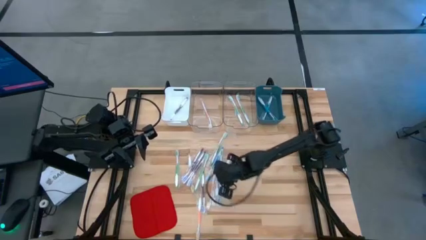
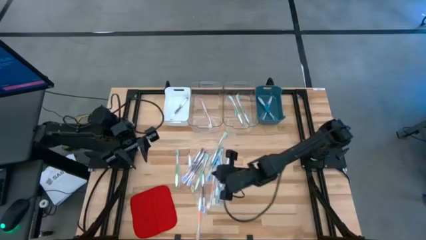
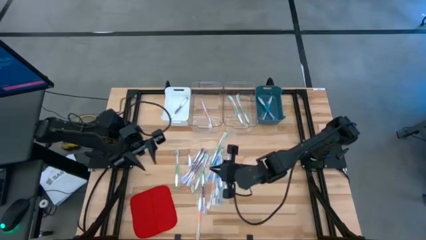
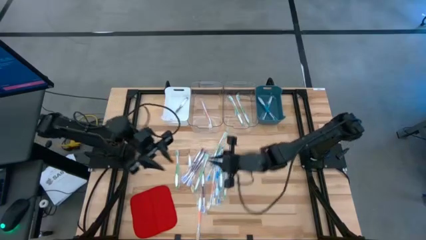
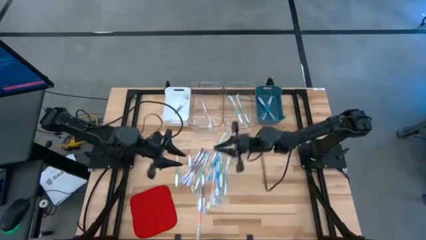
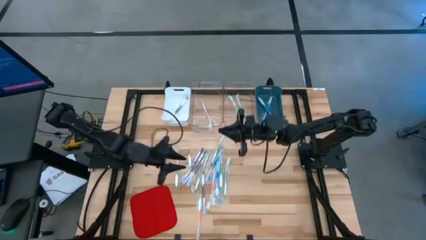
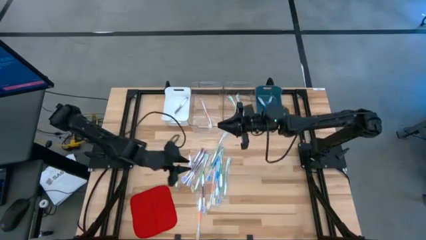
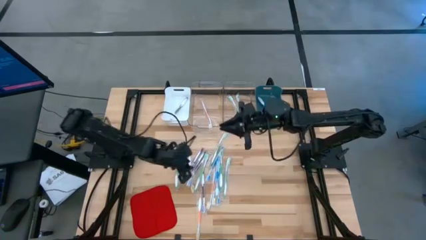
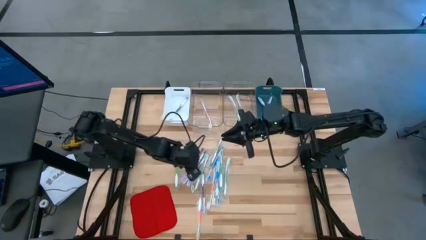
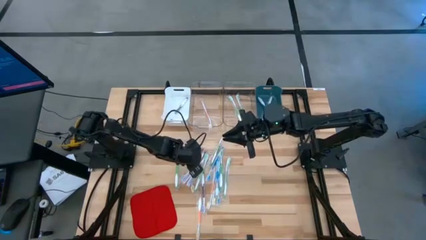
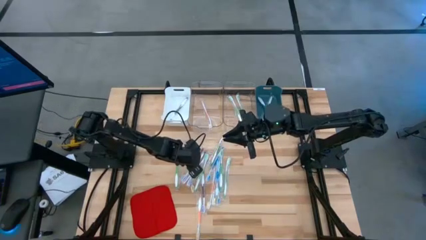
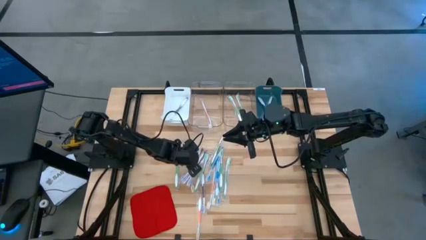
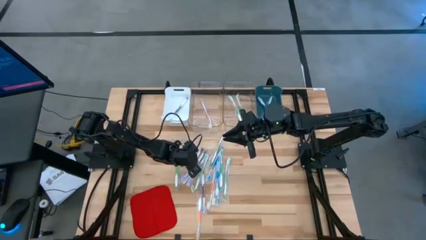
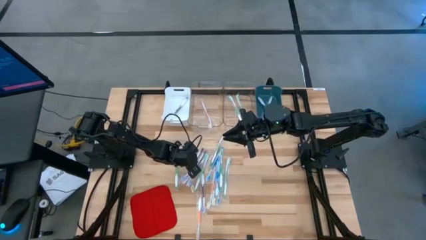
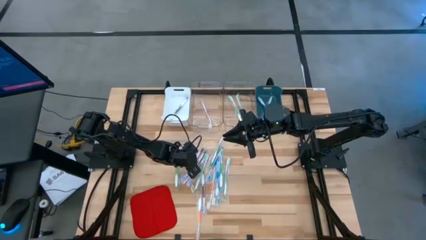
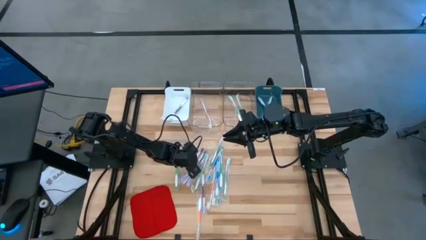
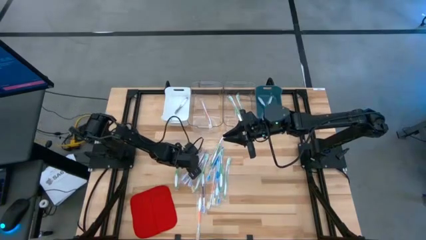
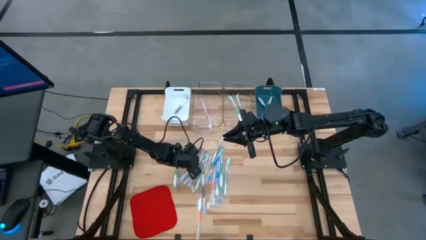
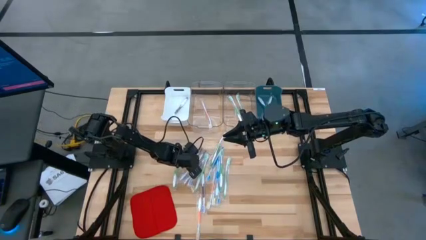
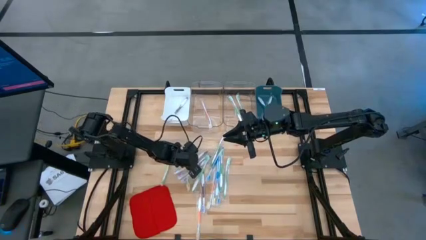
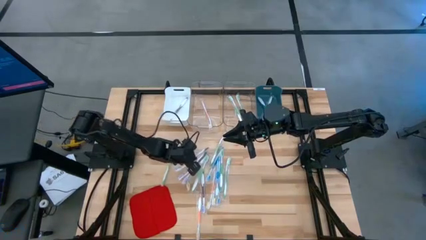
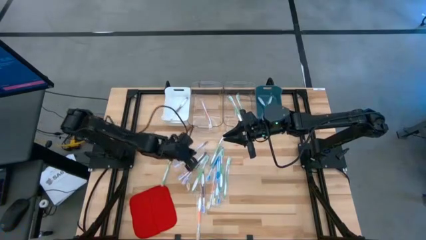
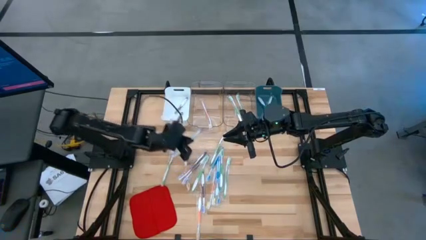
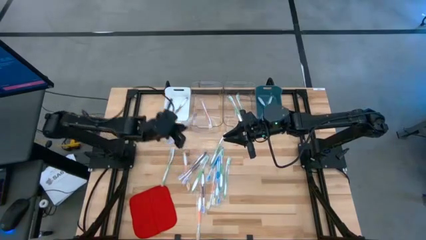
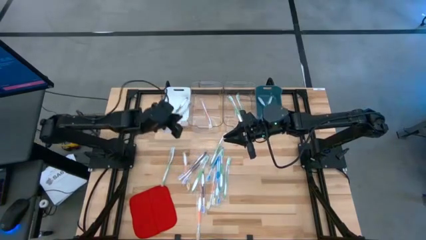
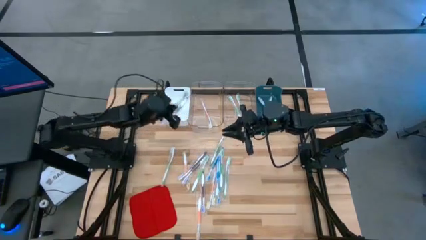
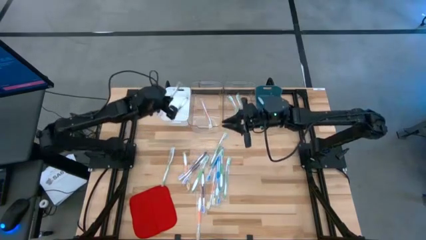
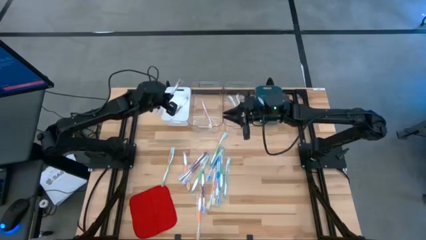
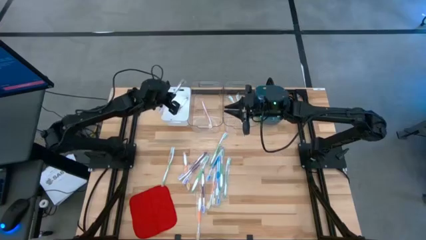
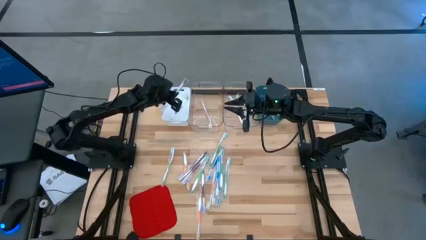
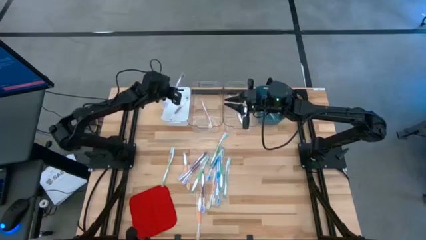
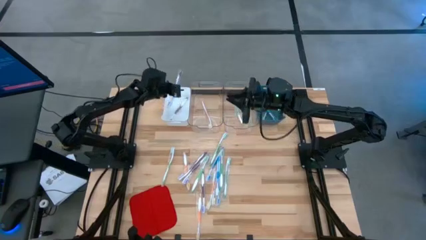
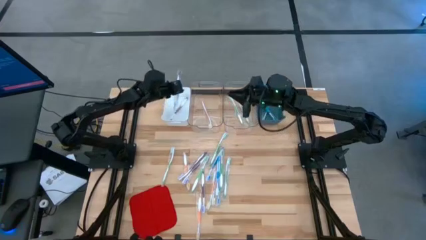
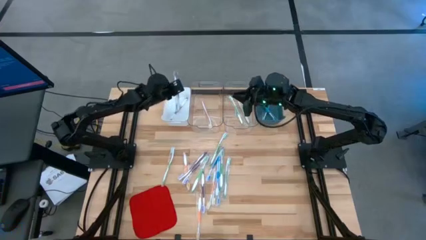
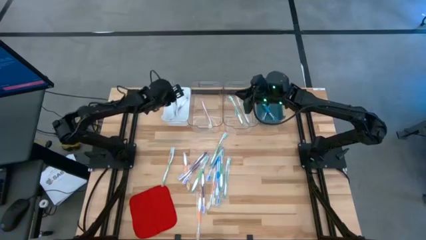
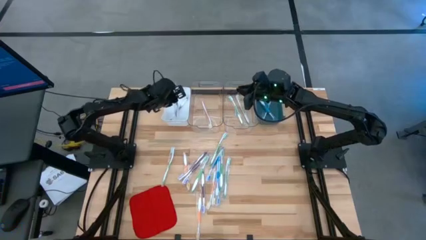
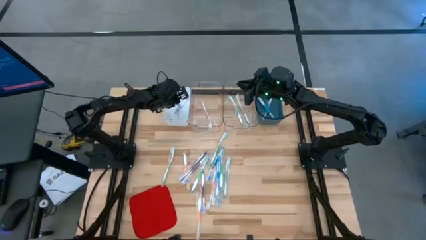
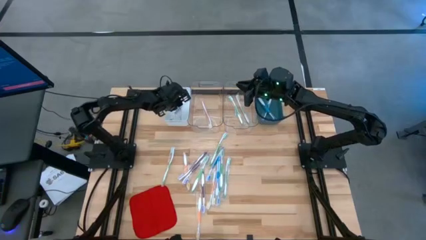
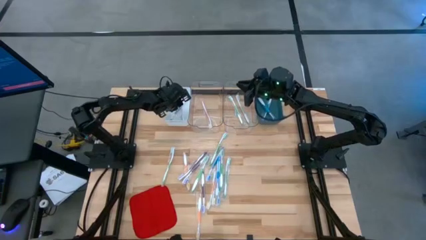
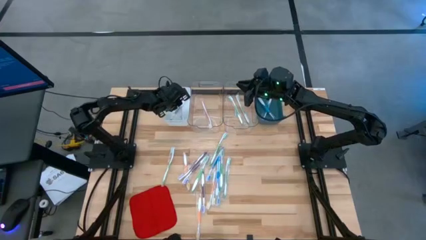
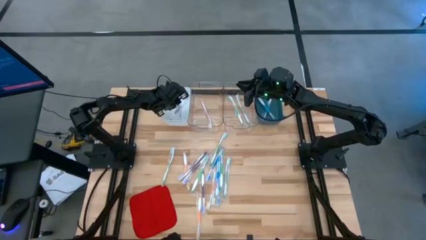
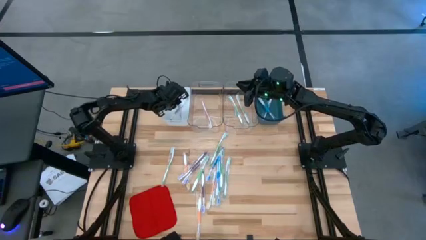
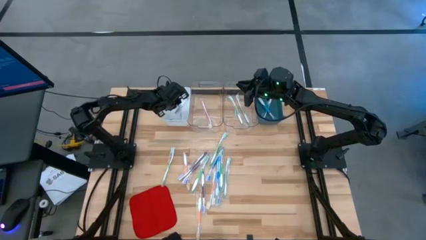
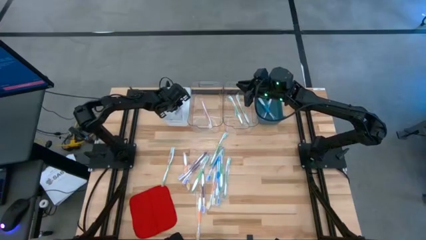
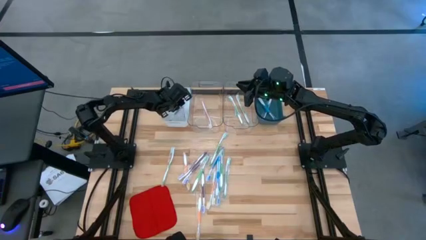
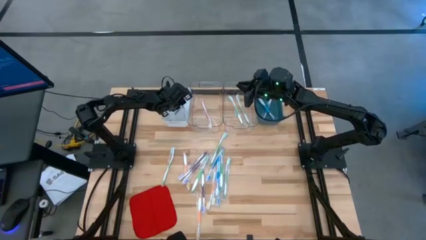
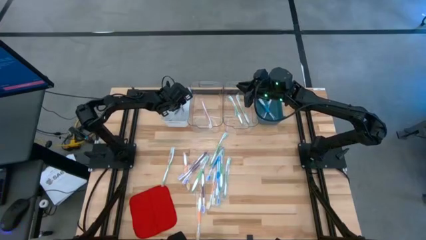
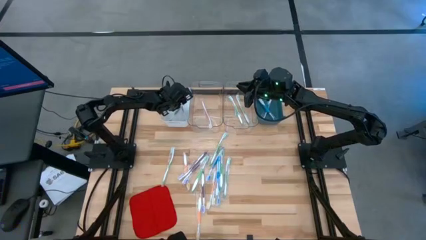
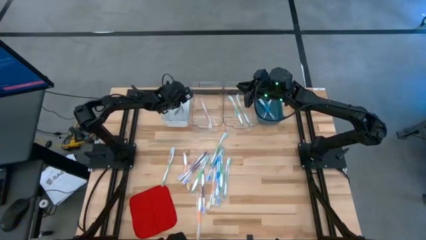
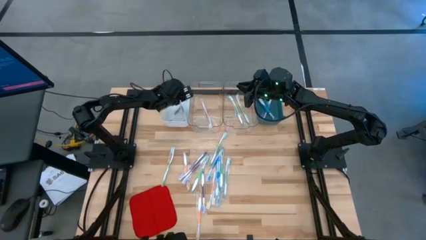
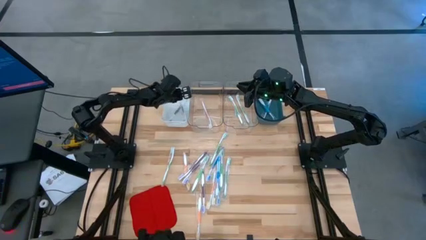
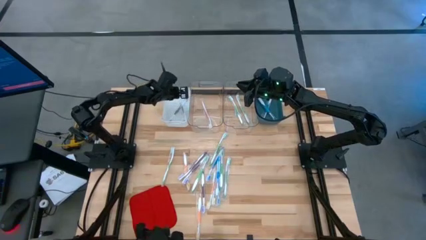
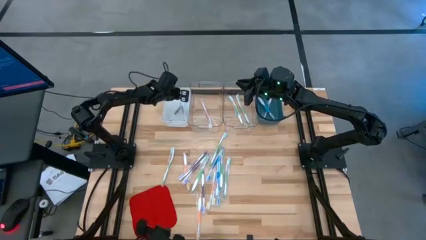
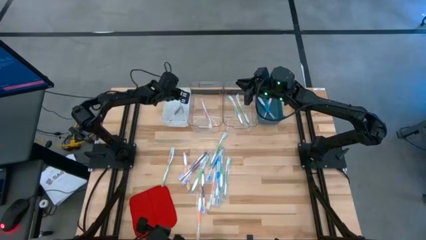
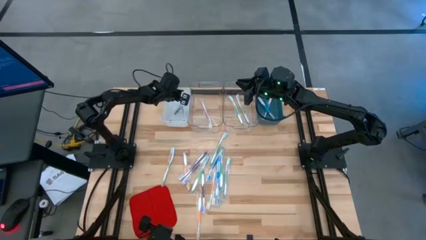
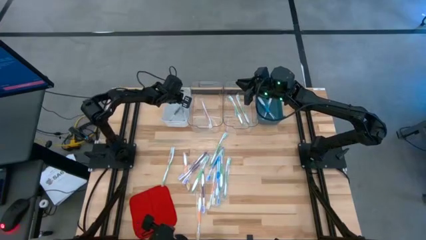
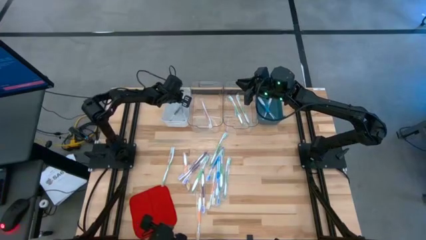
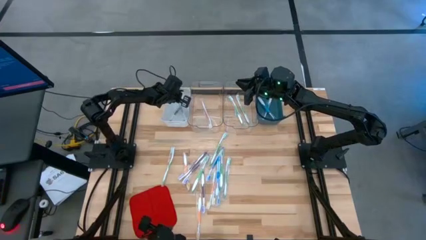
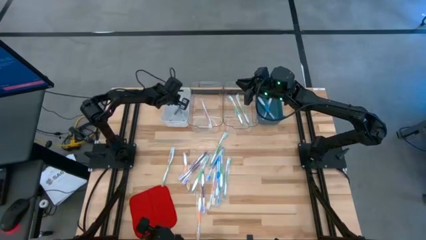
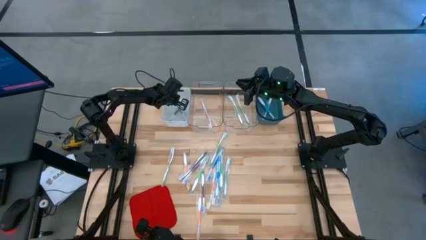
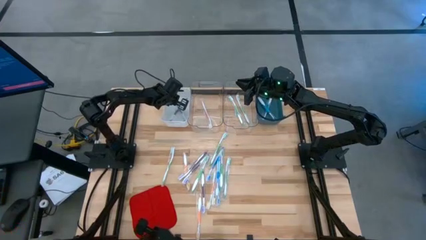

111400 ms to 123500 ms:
Task: Pick & Place Toothbrushes
Put the violet toothbrush into the white bin
